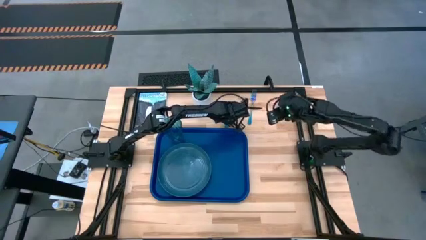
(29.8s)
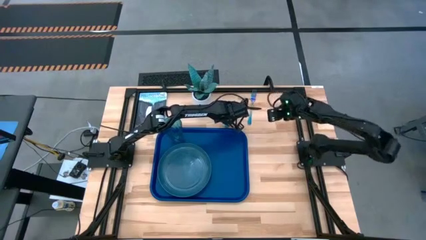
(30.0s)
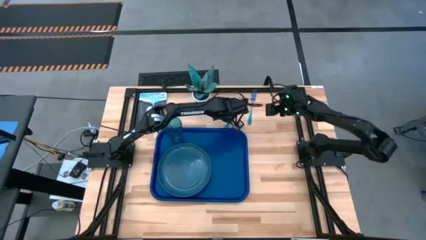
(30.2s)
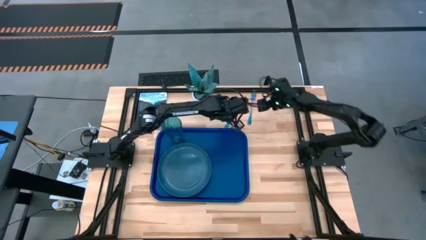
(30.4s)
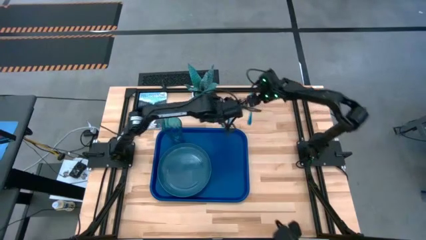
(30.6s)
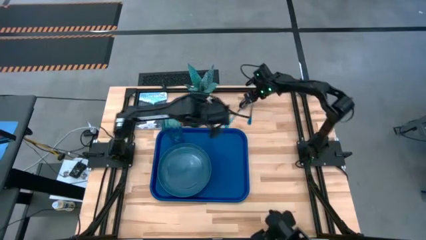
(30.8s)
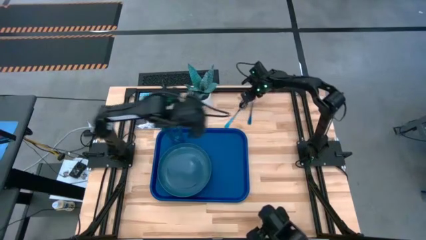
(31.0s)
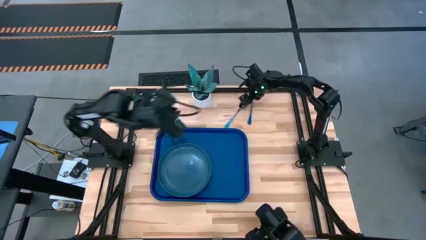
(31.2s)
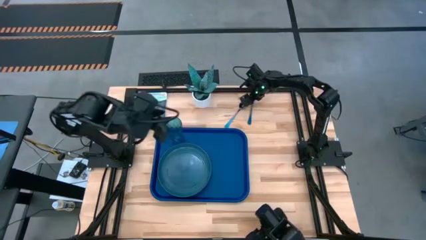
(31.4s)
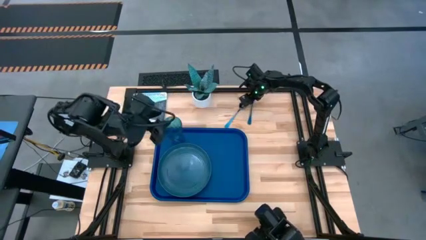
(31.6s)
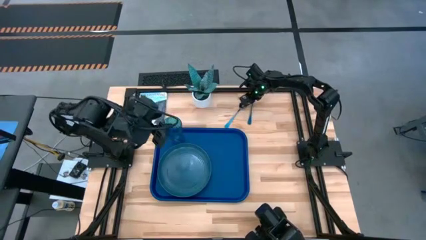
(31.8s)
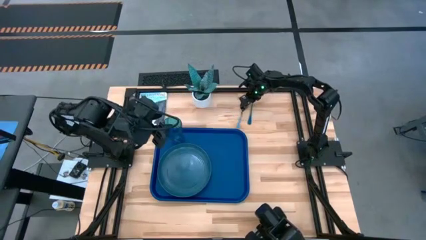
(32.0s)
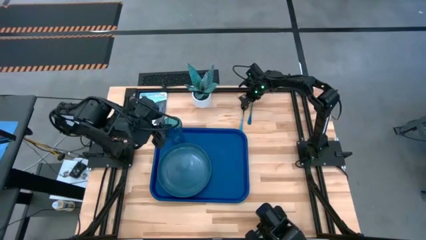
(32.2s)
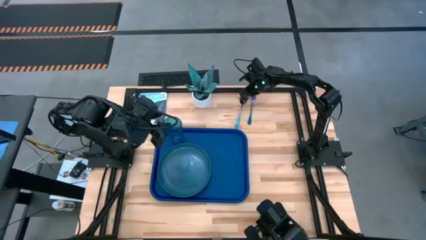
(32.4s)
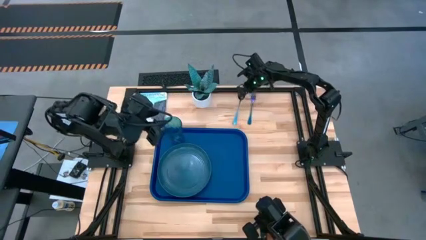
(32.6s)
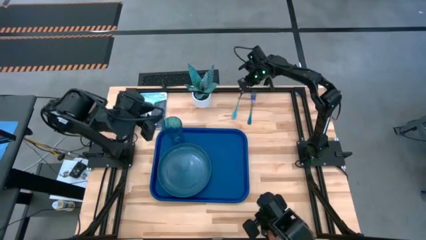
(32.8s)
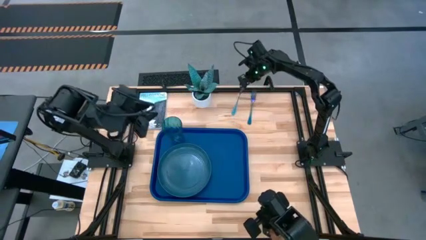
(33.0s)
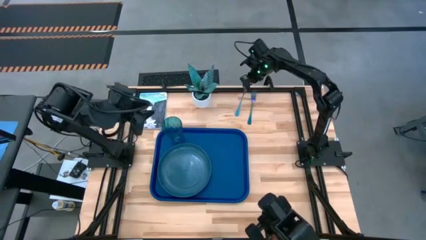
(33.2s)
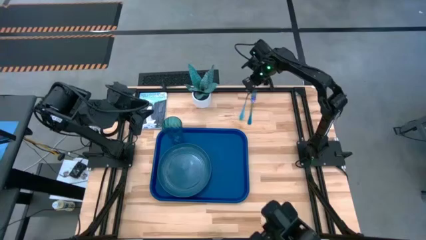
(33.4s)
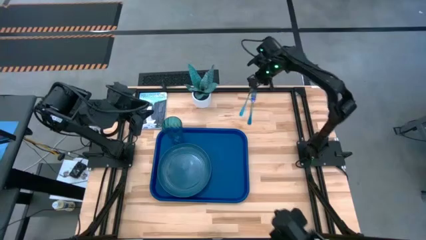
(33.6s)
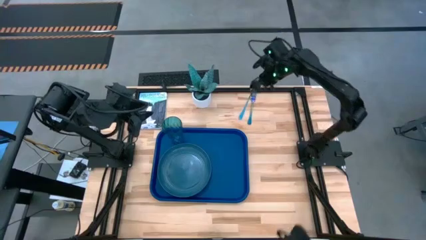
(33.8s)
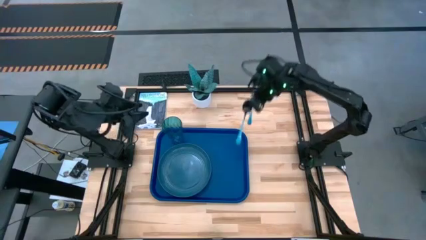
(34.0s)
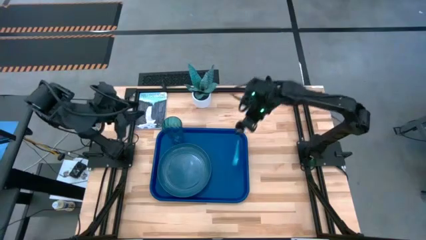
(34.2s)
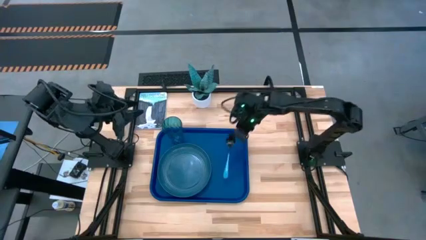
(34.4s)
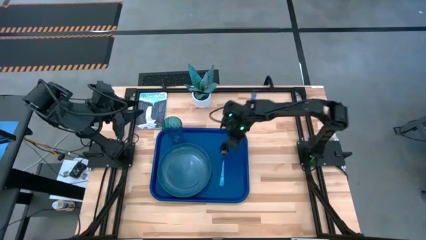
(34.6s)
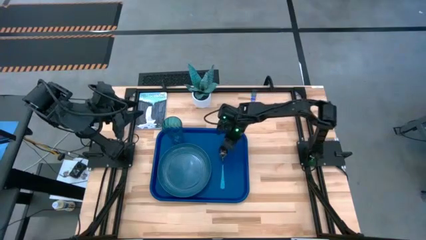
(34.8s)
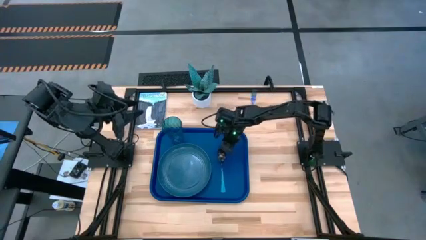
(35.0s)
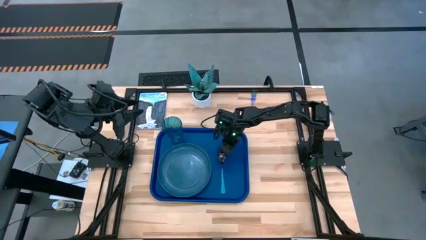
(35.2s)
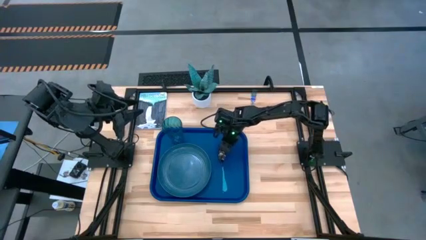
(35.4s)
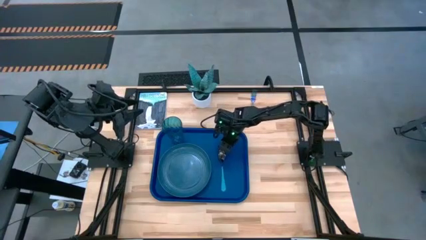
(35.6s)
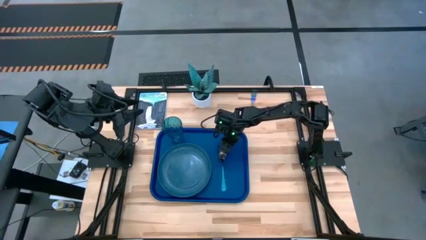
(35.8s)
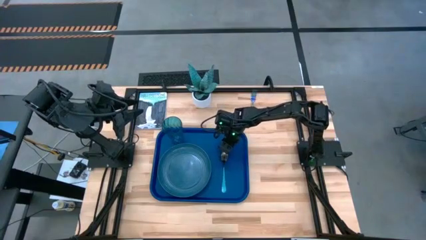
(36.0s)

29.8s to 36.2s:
Task: Pick and place plate/cup/fork/spoon on tray
Put the blue spoon on the blue tray on the right of the plate

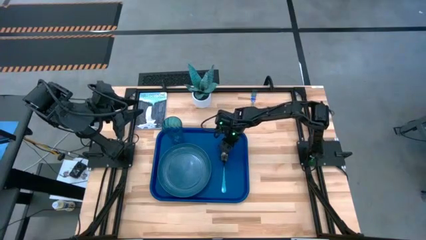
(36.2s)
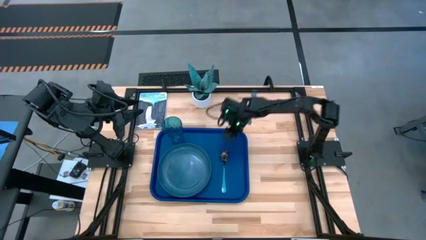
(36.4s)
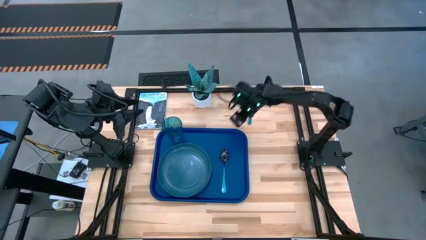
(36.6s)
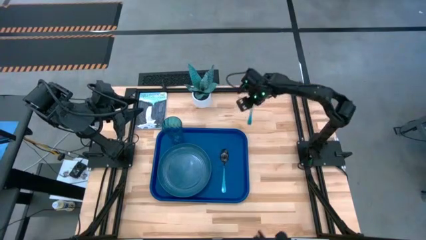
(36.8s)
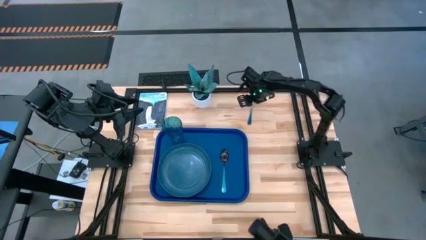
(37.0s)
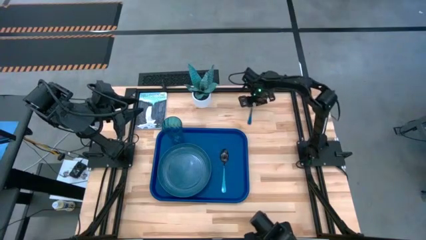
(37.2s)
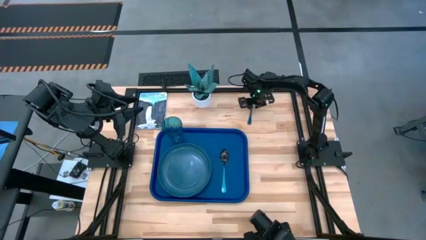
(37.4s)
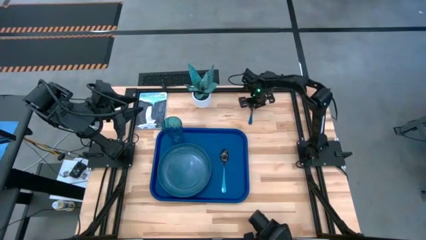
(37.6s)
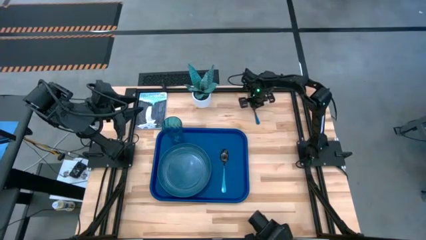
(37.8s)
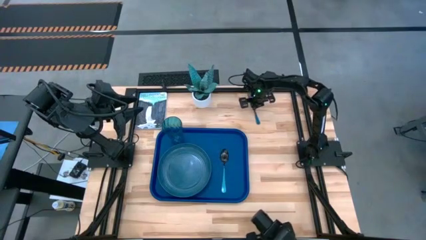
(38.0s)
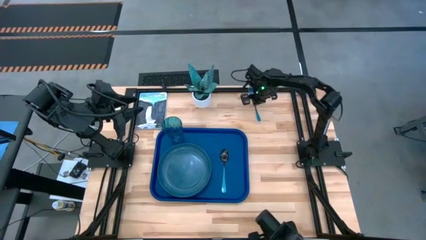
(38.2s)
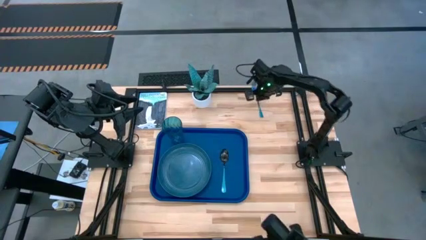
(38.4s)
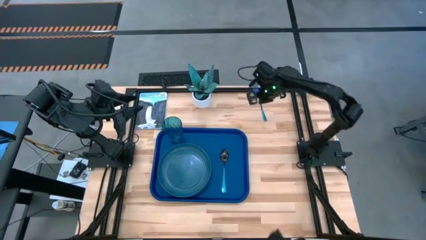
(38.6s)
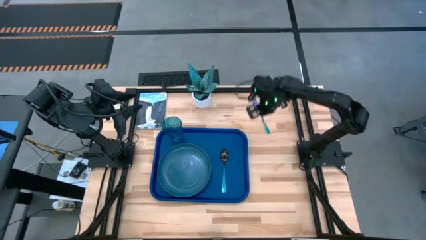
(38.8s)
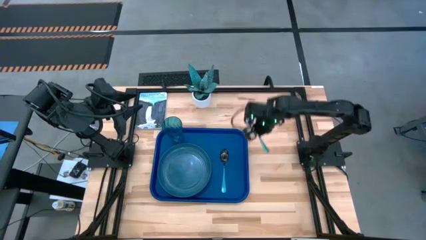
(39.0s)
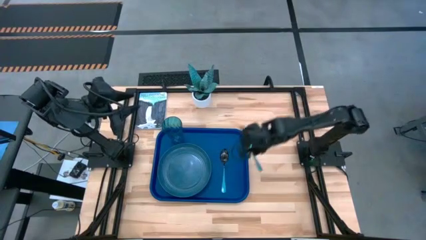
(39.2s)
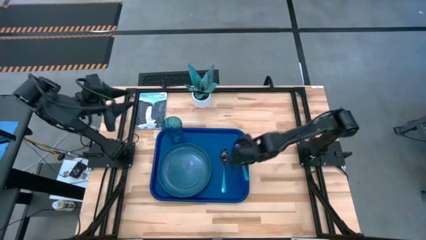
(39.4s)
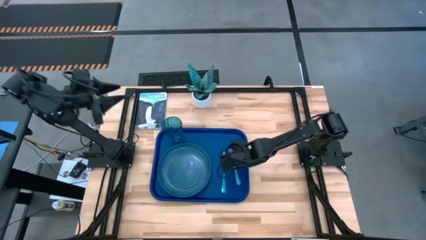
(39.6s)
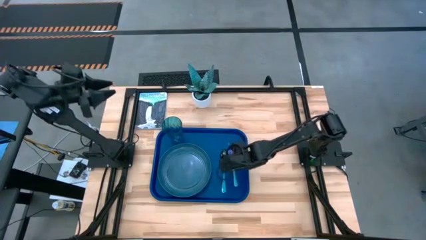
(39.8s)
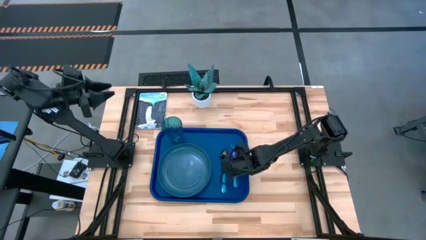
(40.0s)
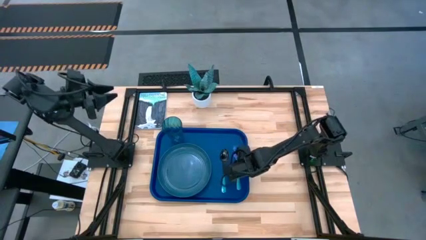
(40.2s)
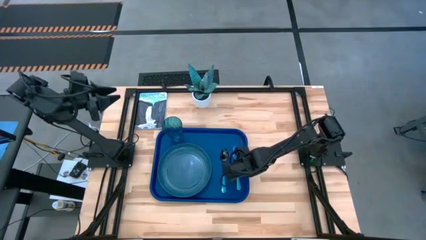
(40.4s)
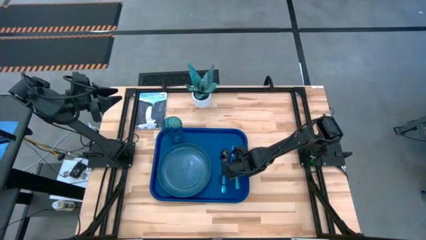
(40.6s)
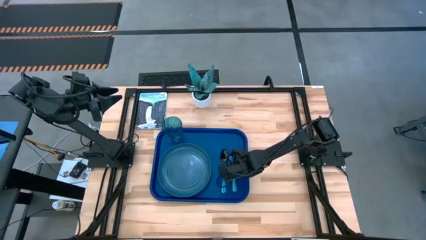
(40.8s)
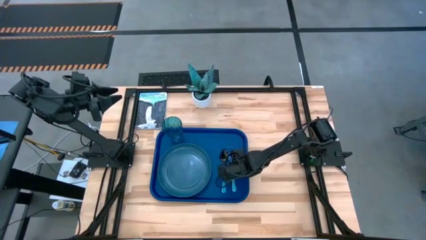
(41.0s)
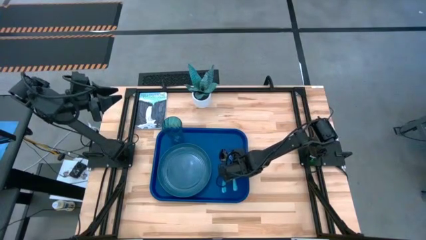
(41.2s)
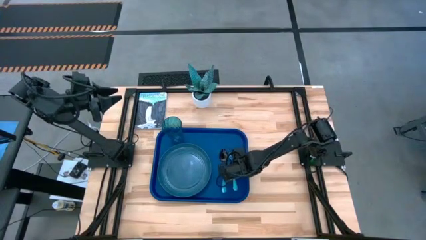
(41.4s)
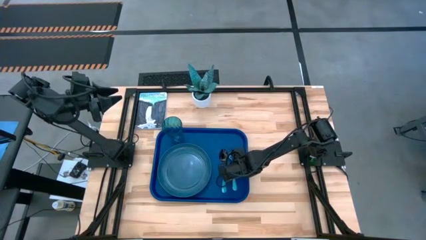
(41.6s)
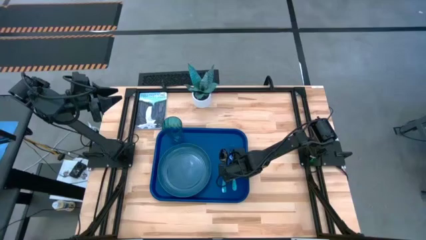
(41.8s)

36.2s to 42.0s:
Put the blue fork on the tray on the right of the blue spoon

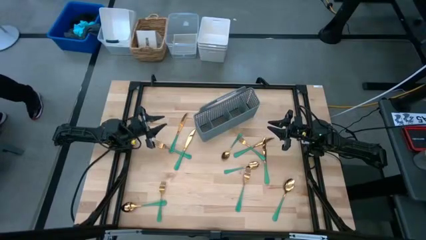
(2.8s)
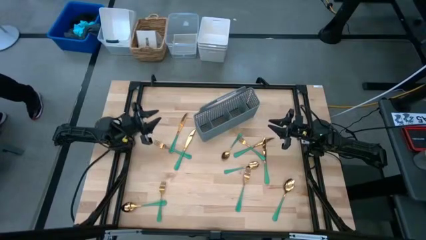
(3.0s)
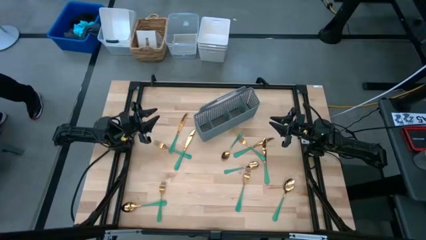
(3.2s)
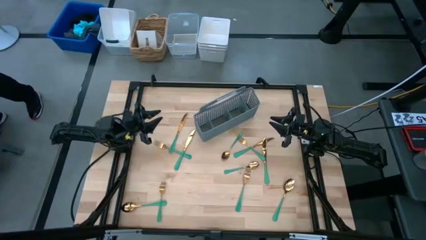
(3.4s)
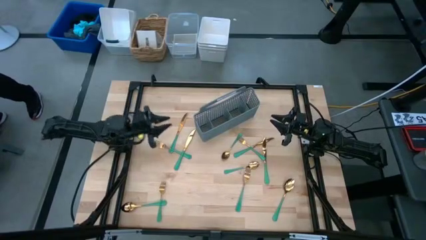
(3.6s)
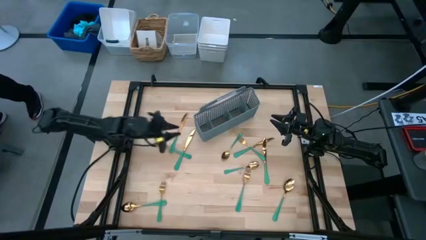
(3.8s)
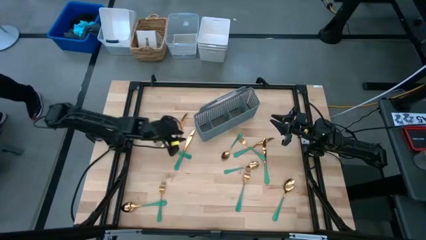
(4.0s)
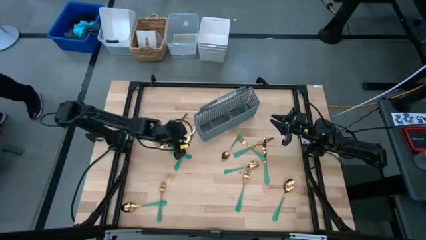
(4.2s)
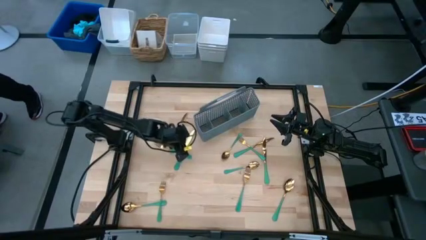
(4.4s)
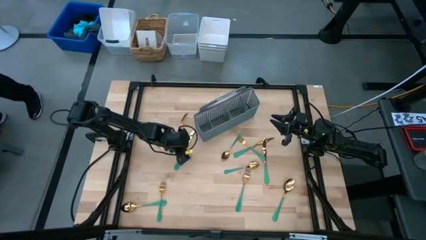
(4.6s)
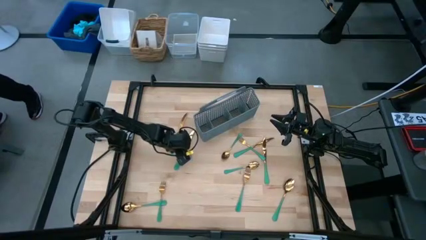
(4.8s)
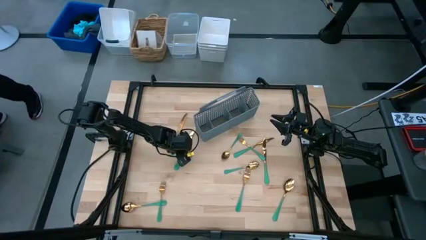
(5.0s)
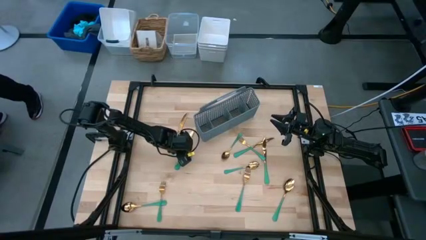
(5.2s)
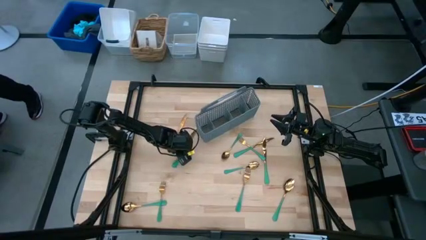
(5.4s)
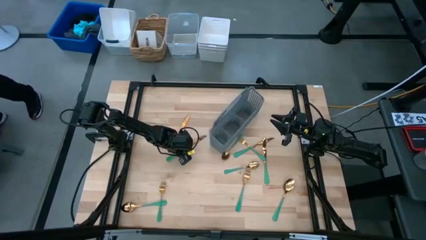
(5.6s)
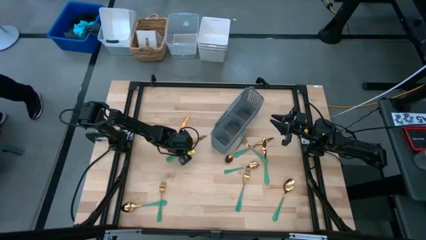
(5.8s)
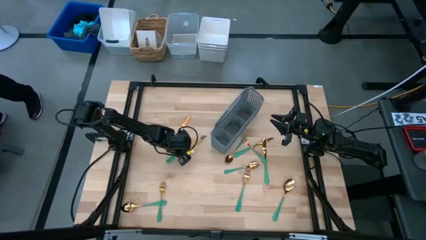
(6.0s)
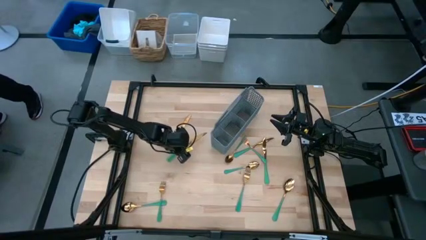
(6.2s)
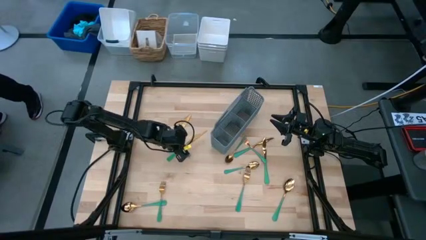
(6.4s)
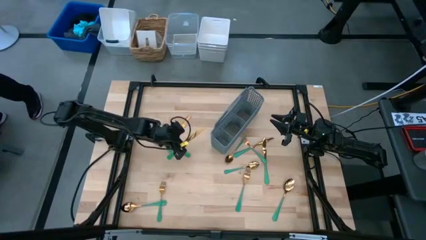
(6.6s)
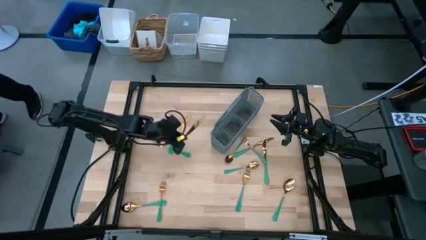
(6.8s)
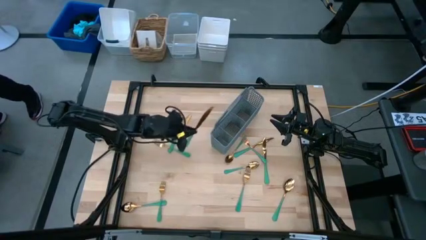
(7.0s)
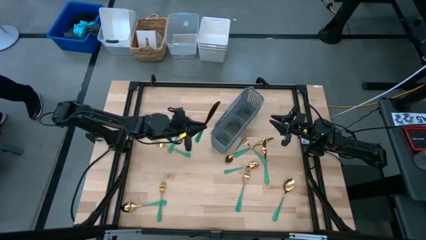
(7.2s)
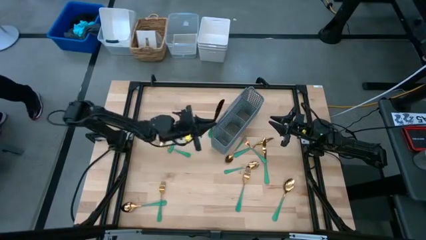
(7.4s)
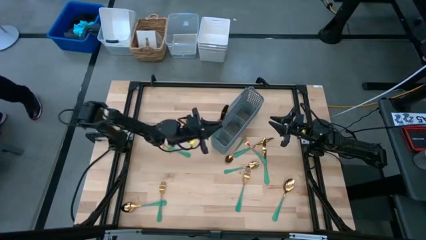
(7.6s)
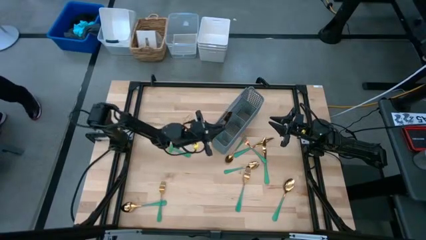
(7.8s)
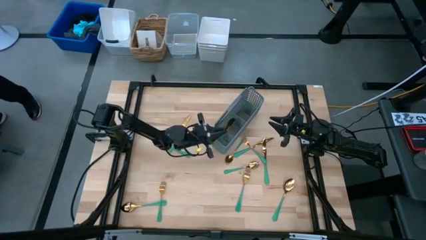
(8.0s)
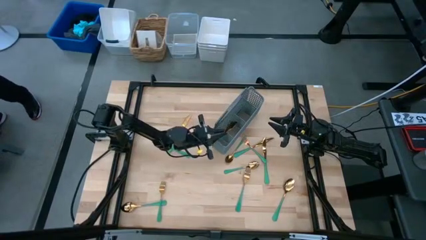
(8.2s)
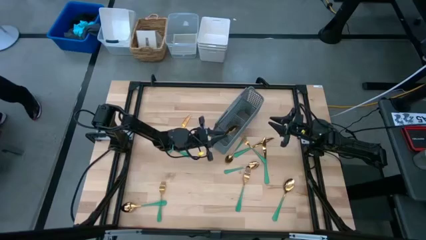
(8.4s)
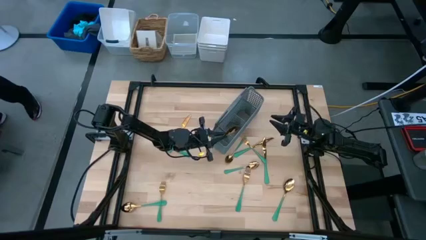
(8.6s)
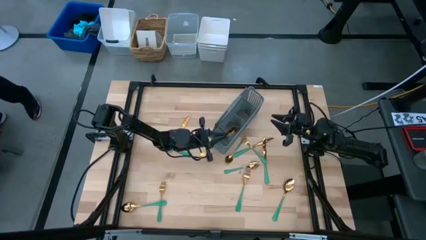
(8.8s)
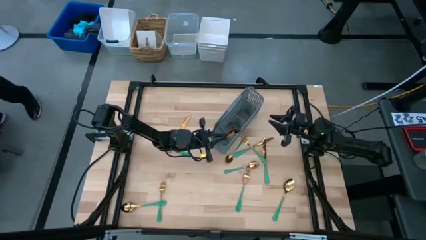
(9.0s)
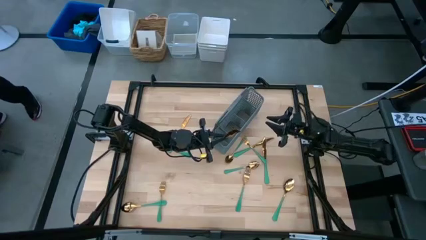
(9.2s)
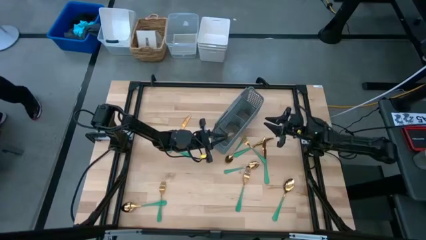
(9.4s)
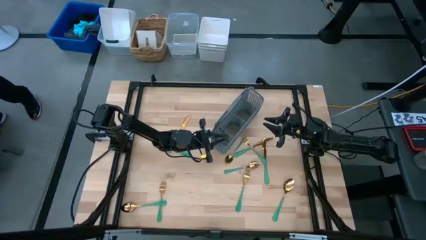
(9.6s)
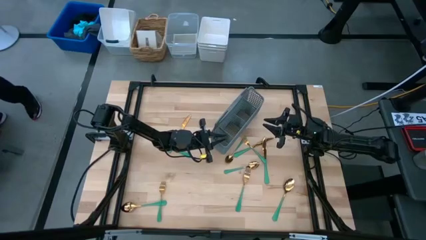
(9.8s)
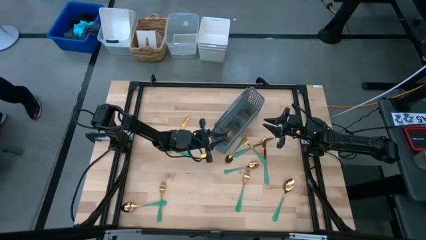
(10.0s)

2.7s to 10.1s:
Task: Sort silverware
Put the left bottom knife into the basket
